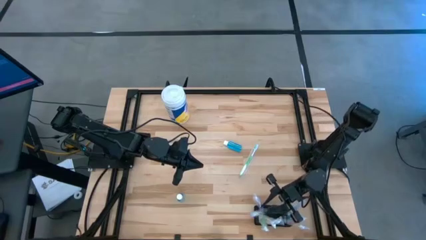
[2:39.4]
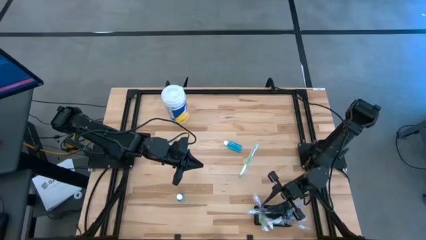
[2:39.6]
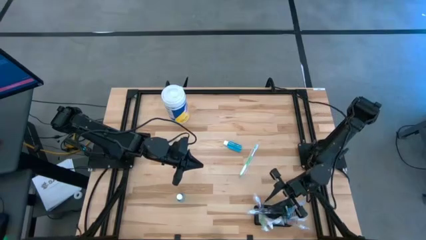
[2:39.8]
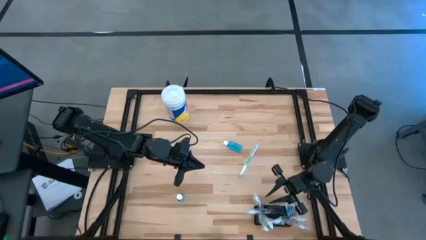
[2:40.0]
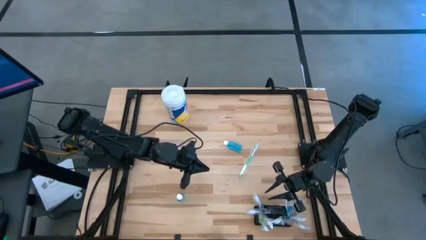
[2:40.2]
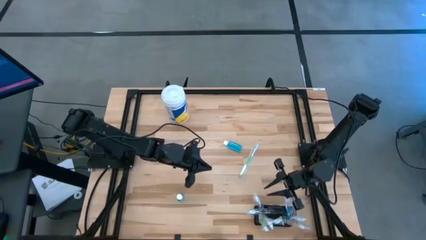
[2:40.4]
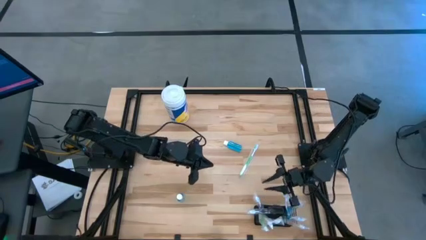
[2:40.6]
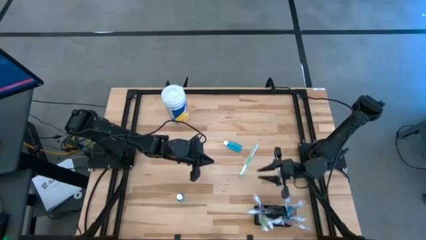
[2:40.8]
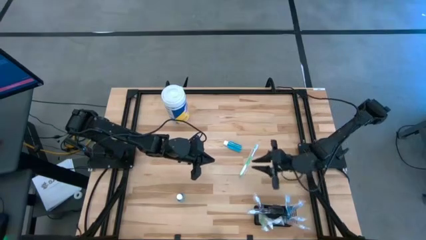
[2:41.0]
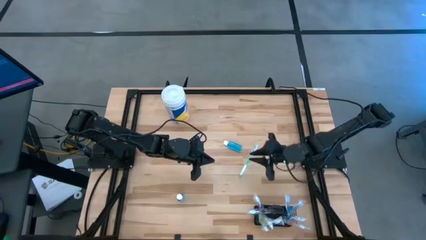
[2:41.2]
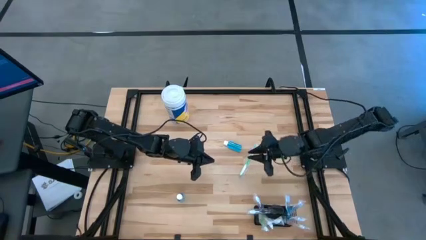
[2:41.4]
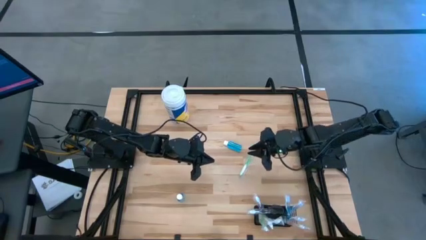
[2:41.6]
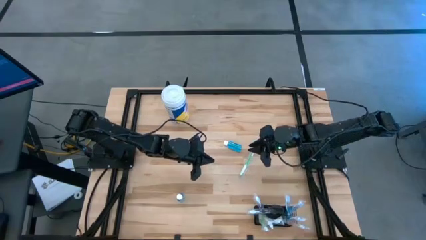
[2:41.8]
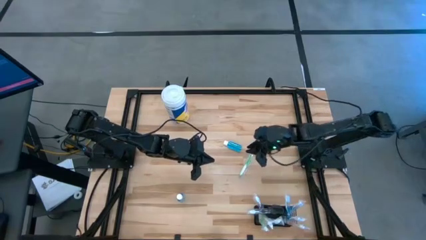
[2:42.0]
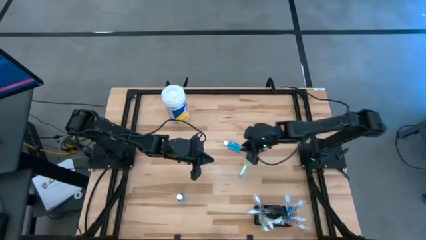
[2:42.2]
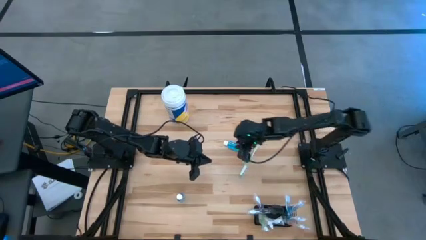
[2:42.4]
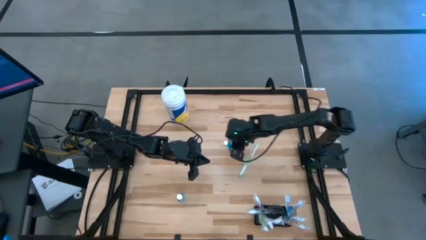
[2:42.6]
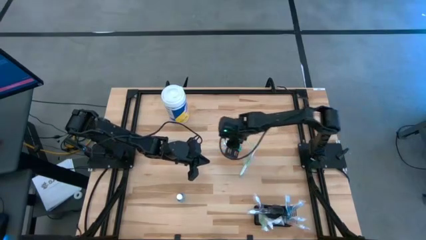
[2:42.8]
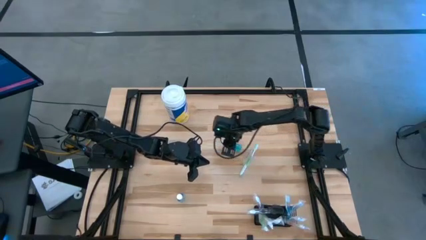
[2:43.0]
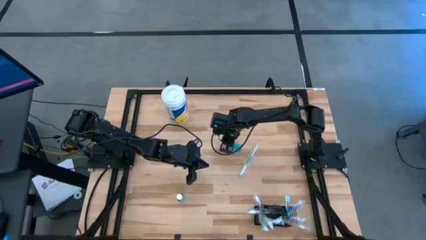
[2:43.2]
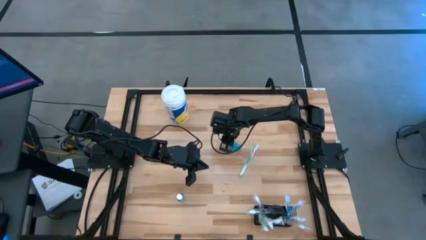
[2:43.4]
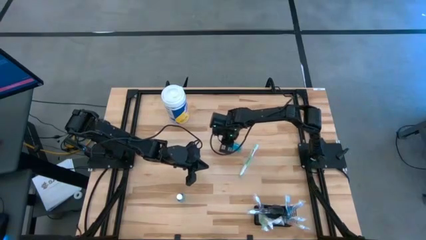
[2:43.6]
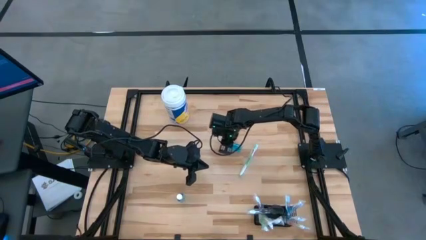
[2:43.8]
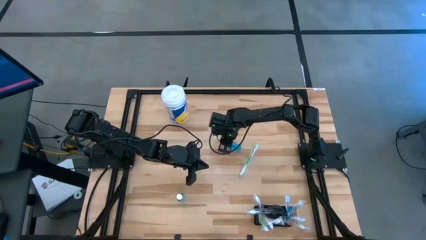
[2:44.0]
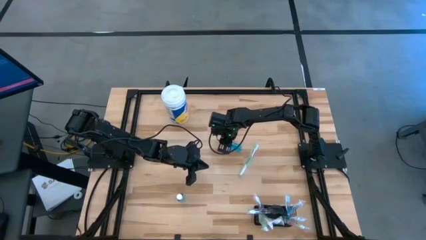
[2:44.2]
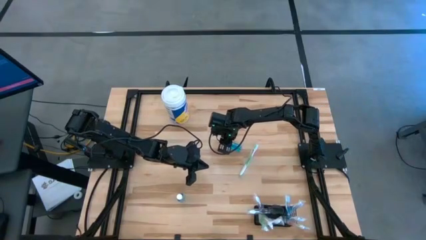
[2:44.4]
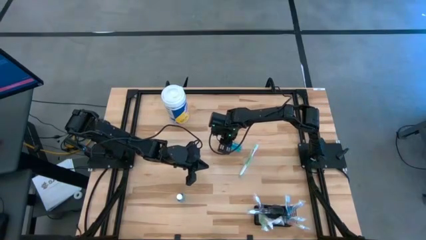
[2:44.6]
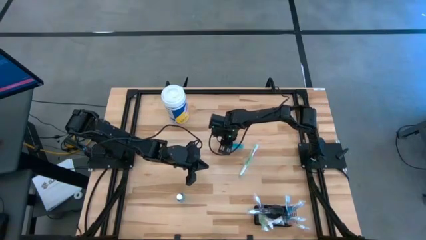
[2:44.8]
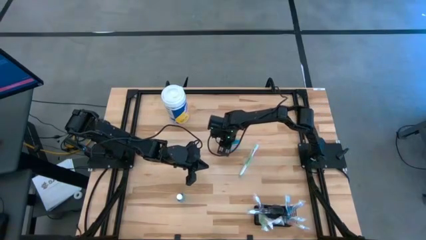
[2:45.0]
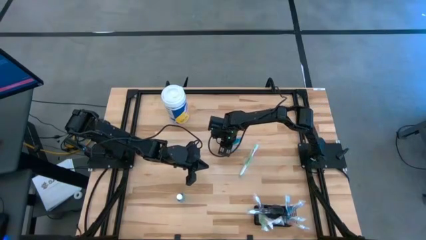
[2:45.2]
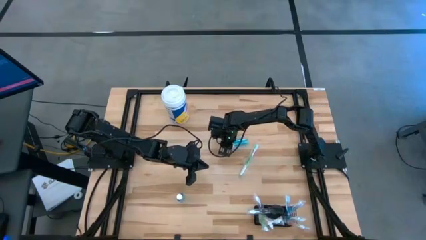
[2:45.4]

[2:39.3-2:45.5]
Task: Pick & Place toothbrushing station
Put the top blue mouthwash into the wire organizer

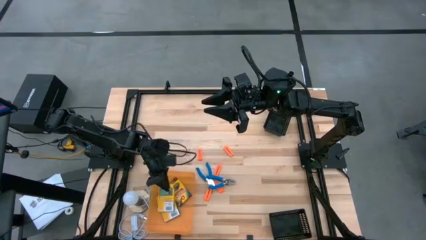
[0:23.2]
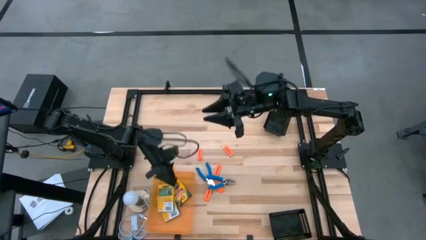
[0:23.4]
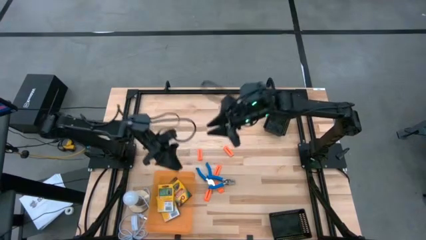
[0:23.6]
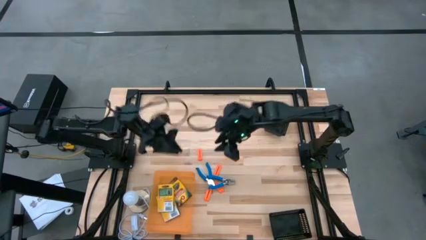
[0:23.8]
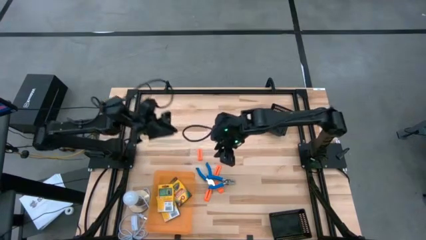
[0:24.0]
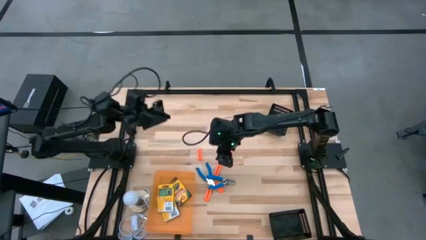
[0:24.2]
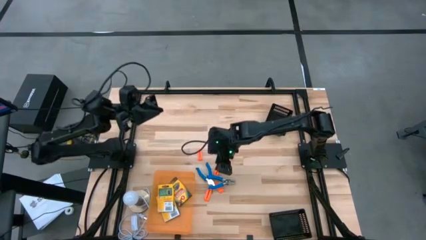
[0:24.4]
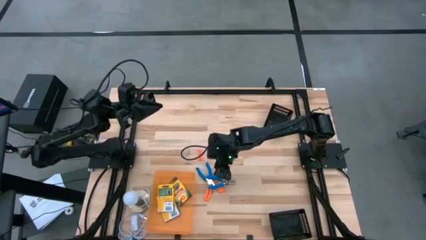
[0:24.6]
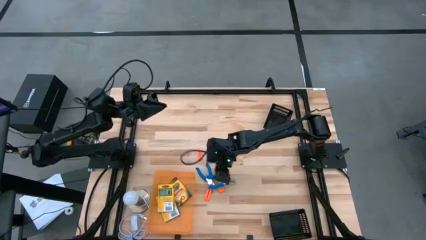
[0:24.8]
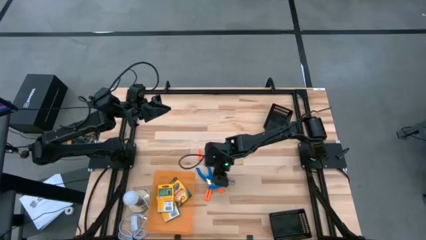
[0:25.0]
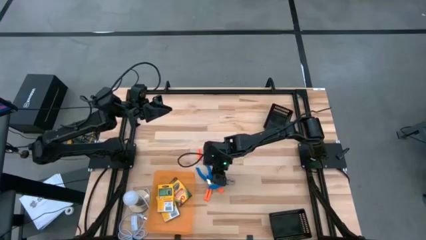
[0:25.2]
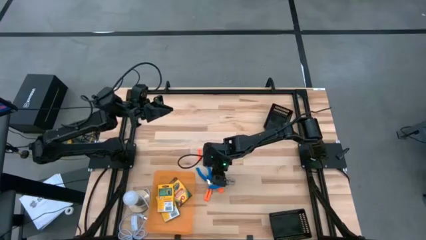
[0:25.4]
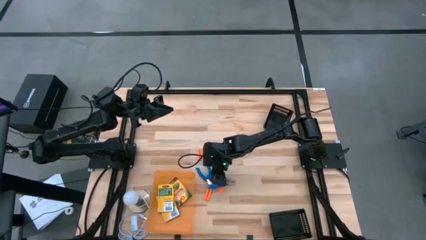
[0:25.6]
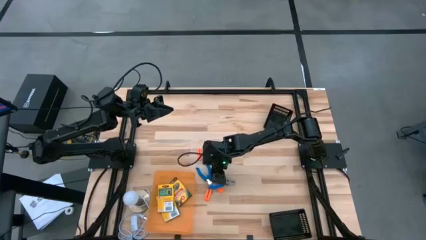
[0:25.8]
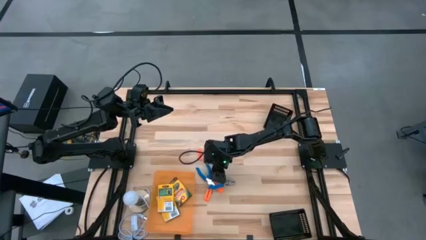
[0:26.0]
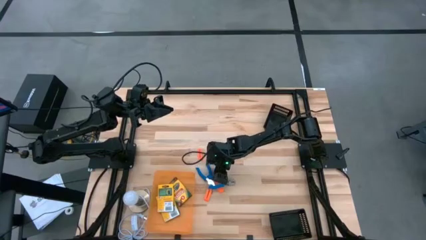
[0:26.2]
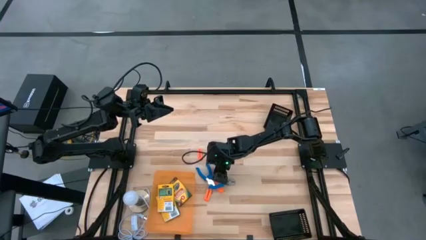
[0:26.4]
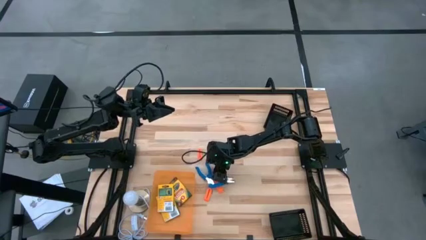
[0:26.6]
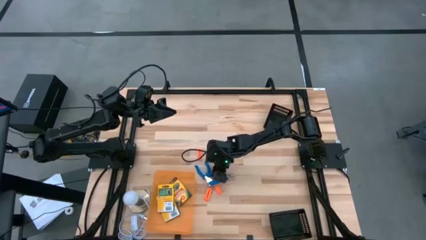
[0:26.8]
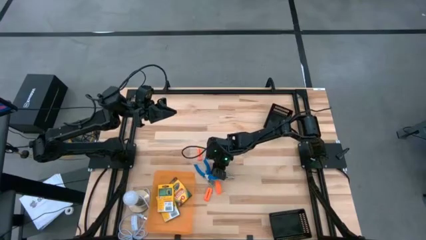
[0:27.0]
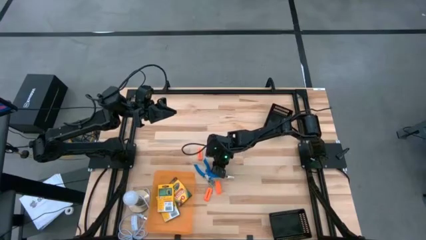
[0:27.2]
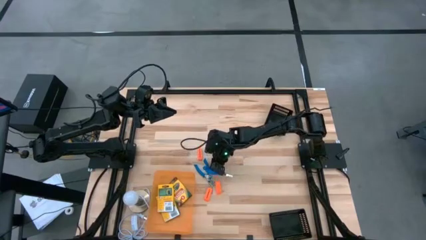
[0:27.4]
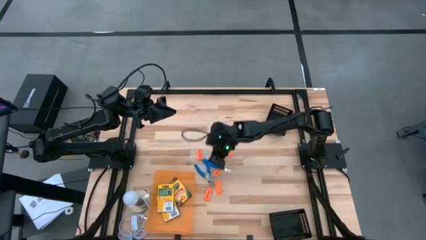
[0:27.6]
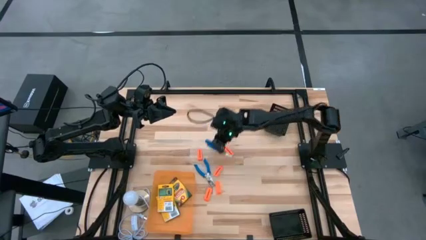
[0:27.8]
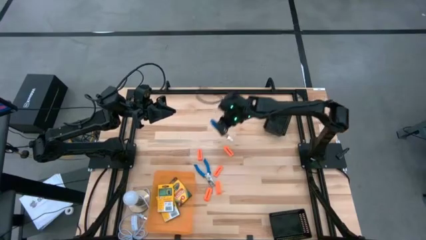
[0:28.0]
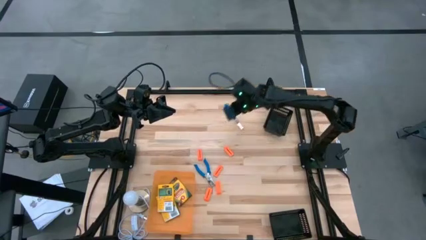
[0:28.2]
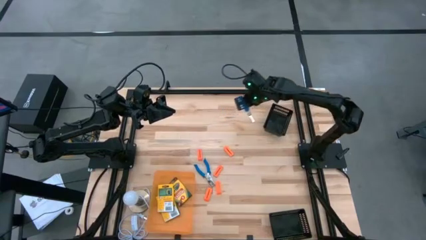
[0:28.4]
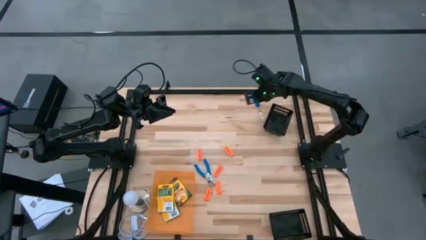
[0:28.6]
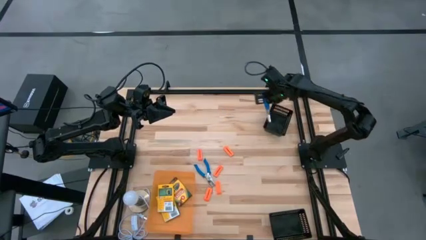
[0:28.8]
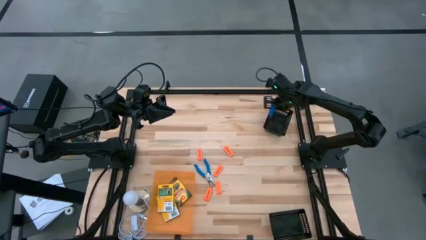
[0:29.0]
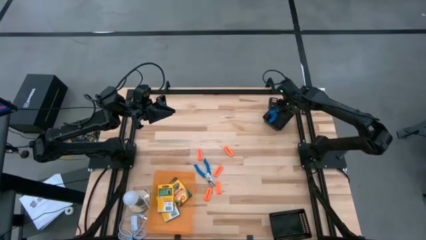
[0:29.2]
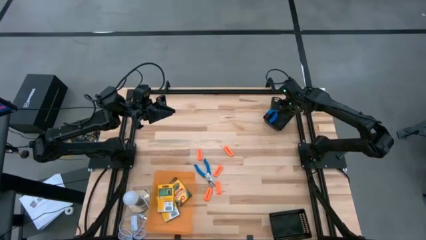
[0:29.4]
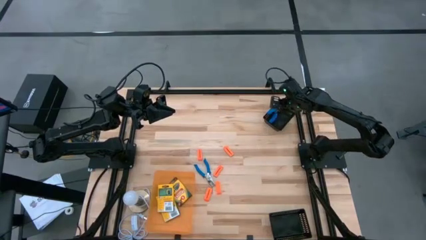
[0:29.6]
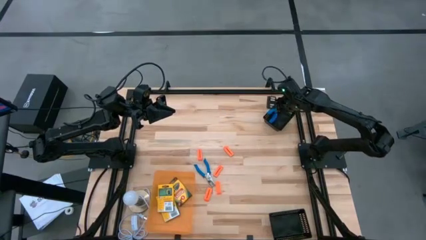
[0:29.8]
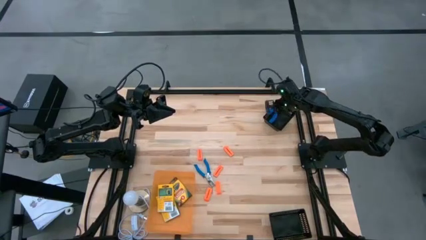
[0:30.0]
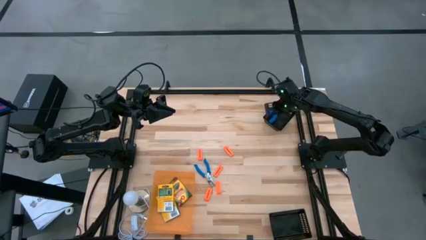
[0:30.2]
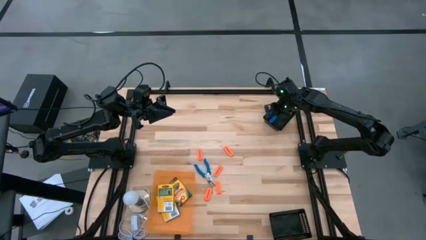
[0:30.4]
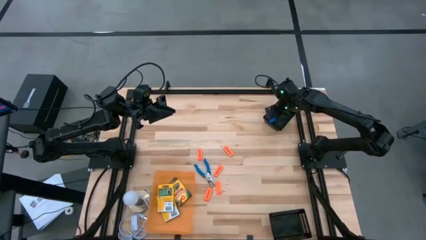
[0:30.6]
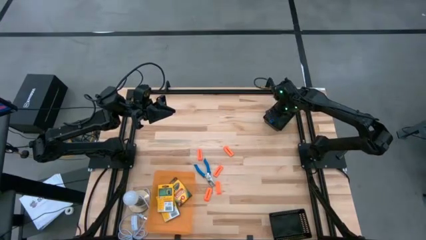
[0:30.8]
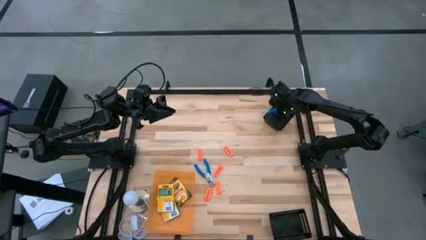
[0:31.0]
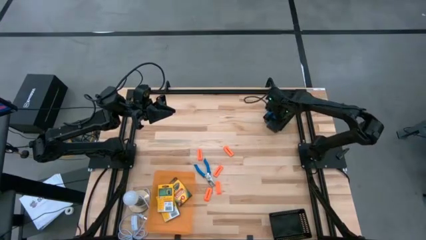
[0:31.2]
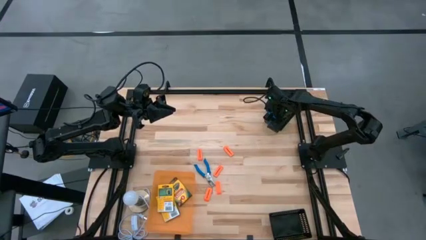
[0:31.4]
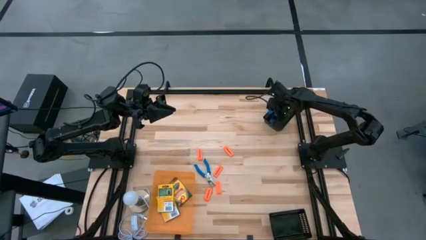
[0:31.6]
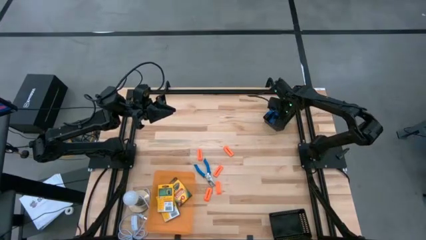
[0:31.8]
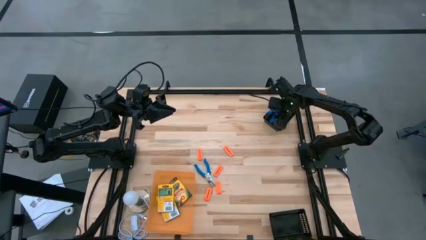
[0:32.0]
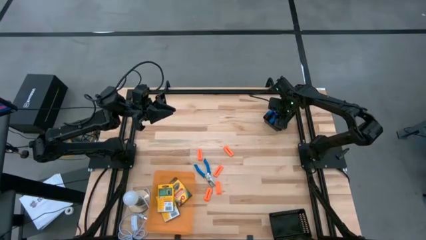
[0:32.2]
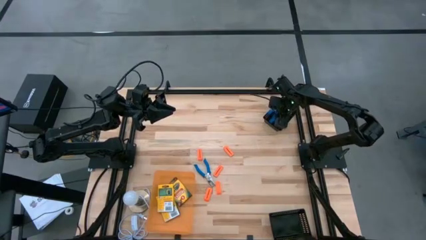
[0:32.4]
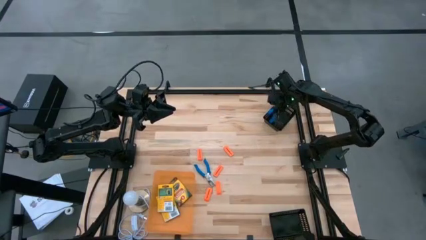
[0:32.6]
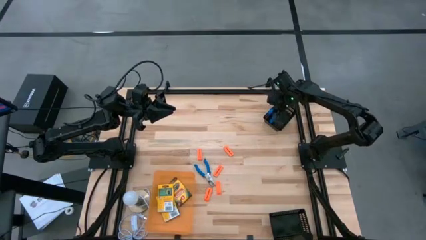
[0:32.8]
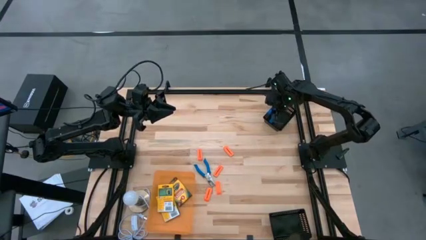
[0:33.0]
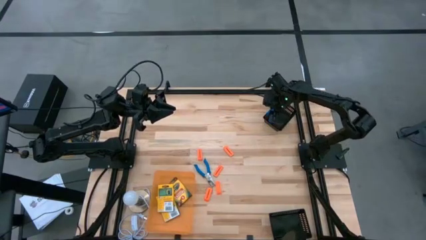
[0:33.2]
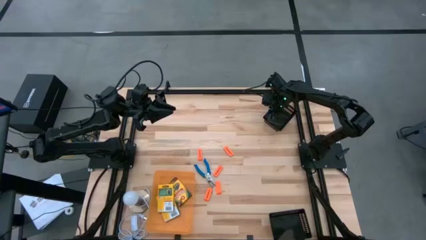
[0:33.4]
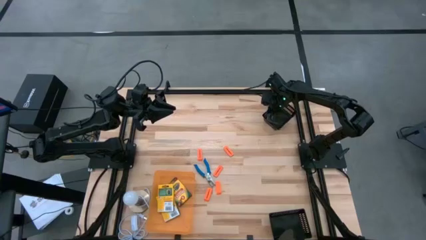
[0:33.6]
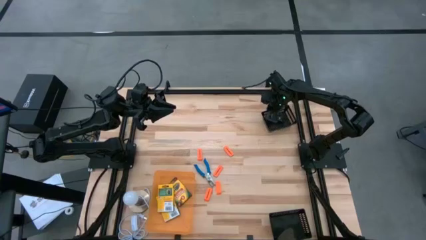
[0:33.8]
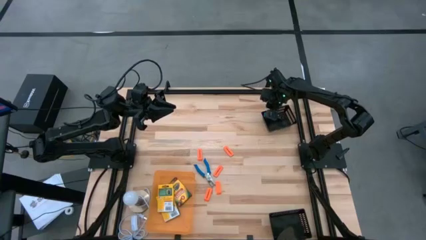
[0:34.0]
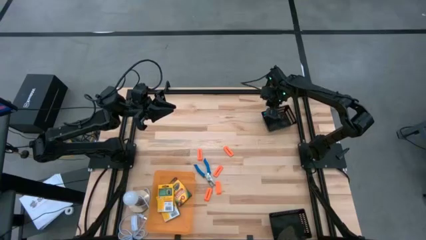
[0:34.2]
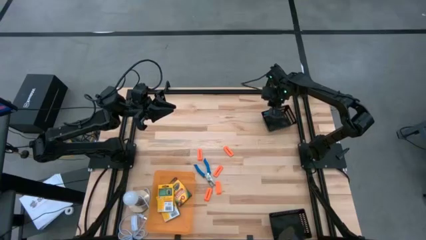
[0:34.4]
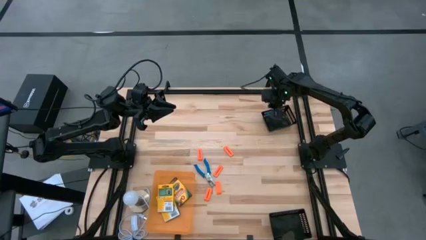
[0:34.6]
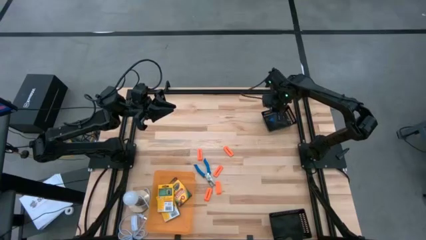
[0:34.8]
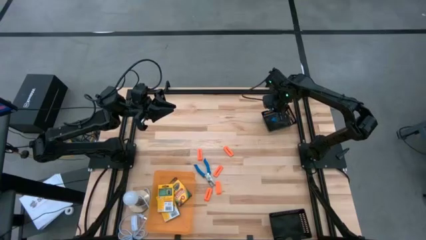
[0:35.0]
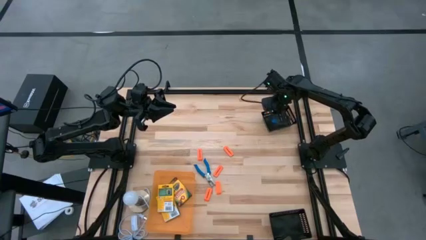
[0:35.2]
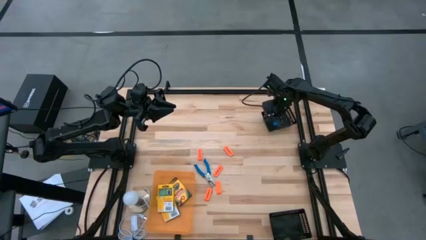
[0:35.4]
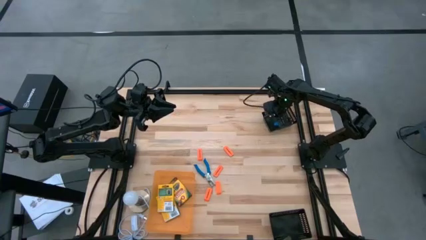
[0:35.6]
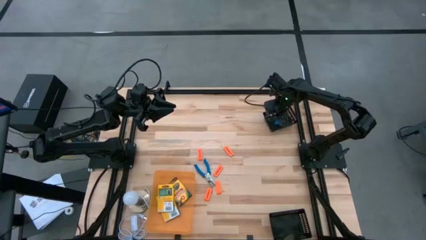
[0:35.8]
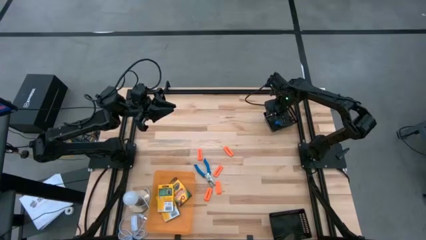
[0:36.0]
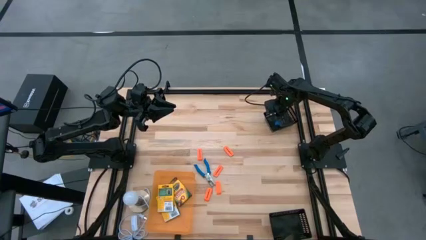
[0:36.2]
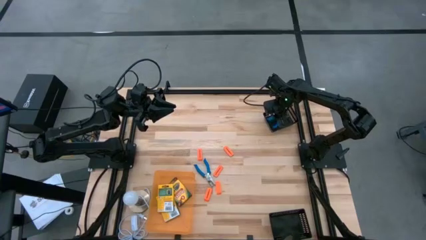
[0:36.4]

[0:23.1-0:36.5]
Task: Pick & Place School Supplies
Put the bottom blue hole puncher into the top black bin
